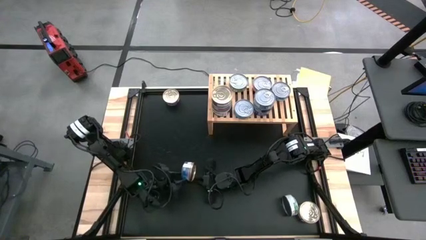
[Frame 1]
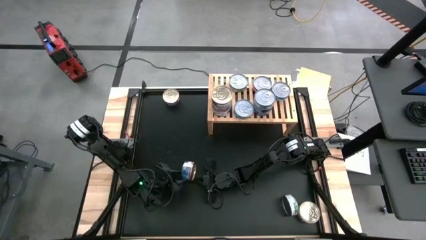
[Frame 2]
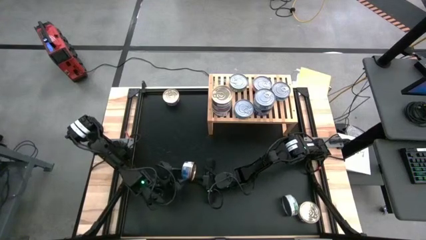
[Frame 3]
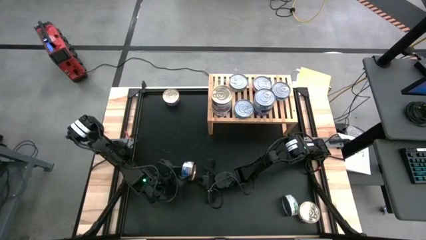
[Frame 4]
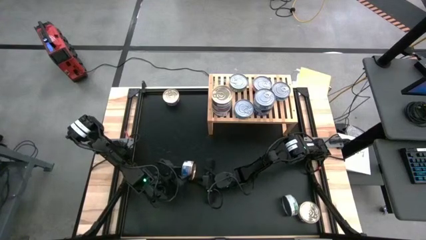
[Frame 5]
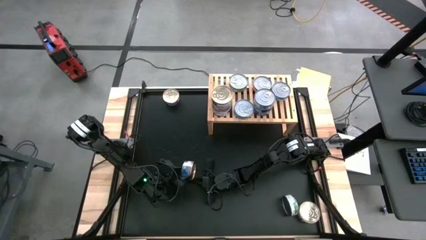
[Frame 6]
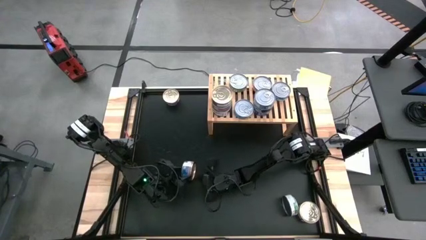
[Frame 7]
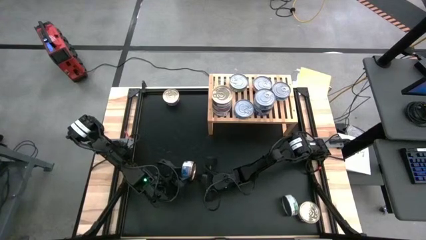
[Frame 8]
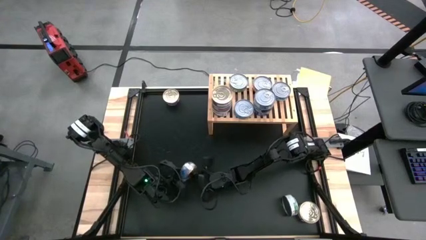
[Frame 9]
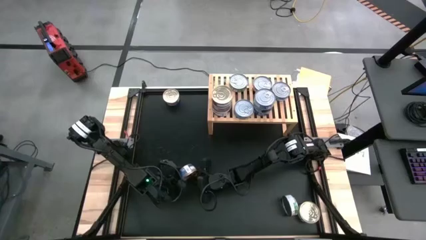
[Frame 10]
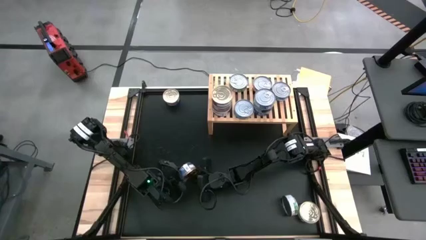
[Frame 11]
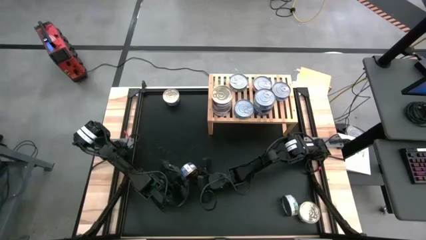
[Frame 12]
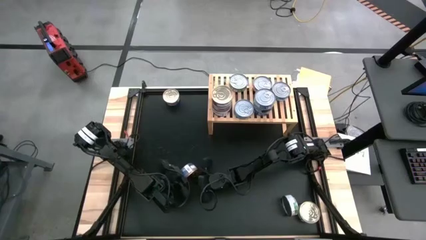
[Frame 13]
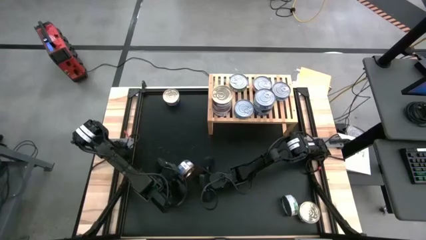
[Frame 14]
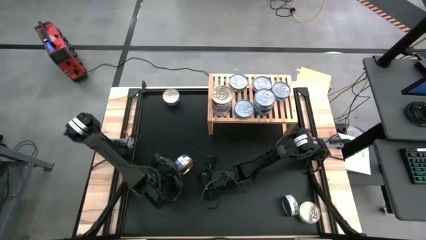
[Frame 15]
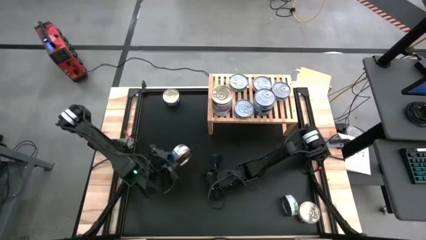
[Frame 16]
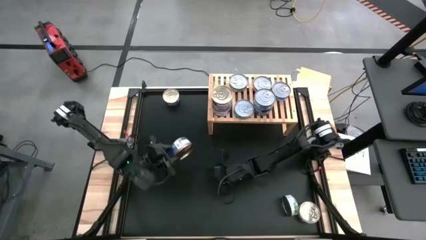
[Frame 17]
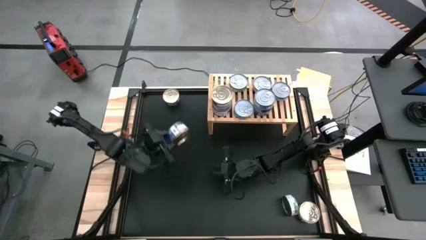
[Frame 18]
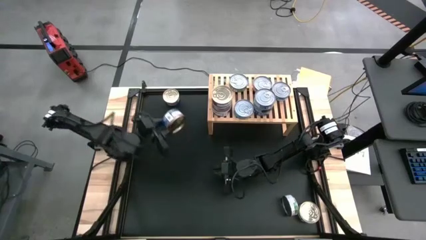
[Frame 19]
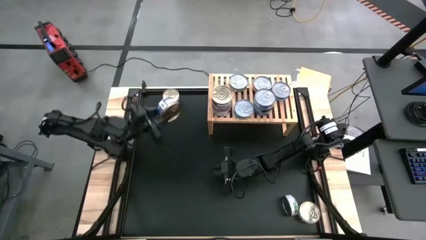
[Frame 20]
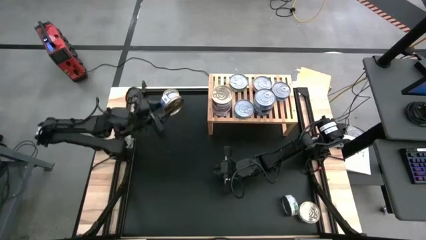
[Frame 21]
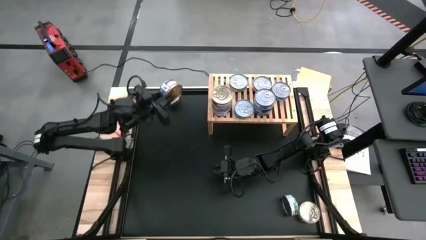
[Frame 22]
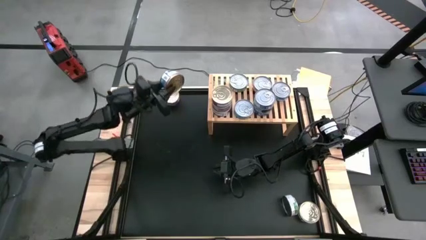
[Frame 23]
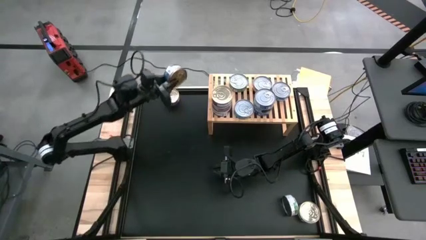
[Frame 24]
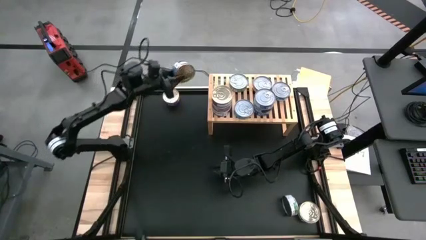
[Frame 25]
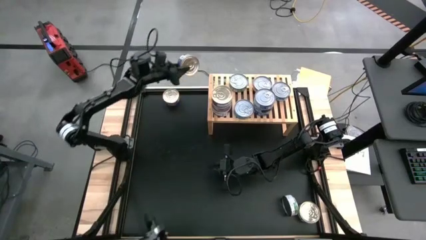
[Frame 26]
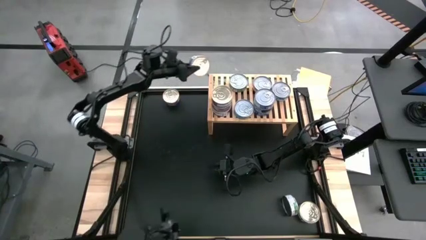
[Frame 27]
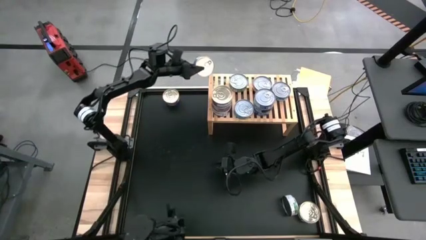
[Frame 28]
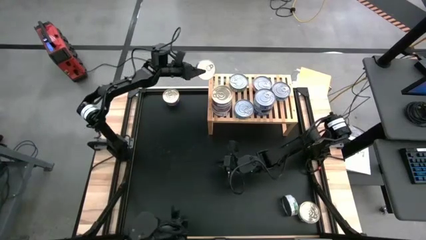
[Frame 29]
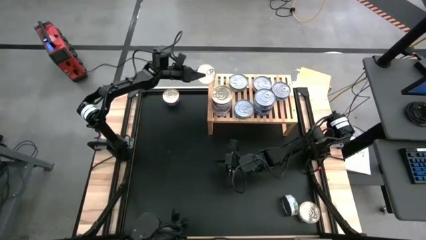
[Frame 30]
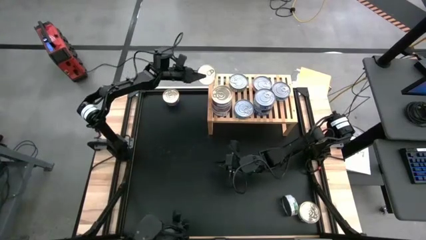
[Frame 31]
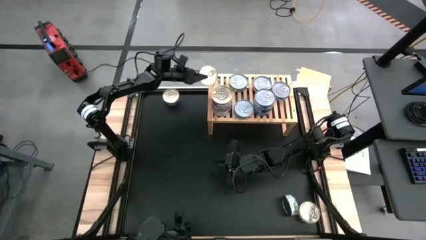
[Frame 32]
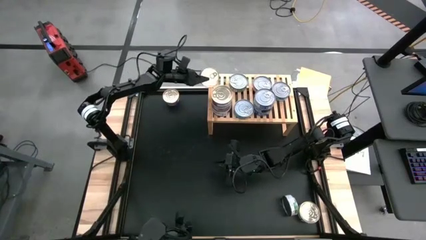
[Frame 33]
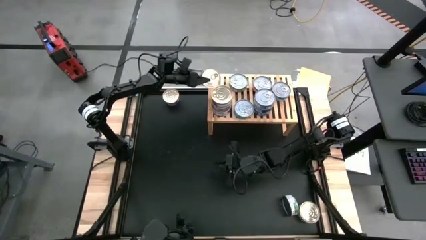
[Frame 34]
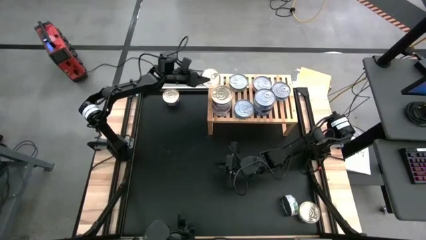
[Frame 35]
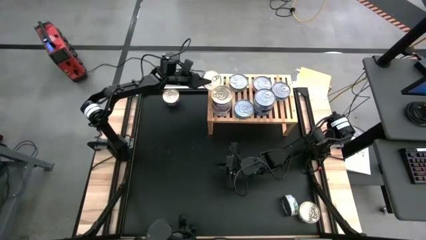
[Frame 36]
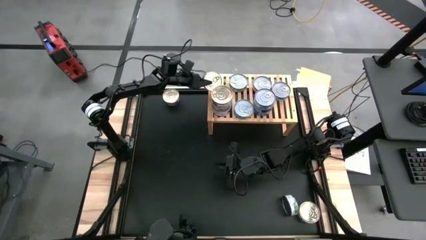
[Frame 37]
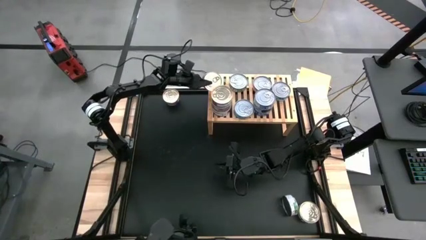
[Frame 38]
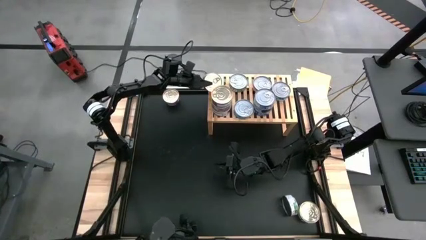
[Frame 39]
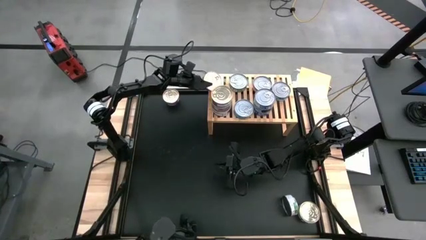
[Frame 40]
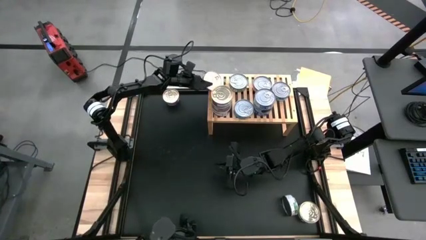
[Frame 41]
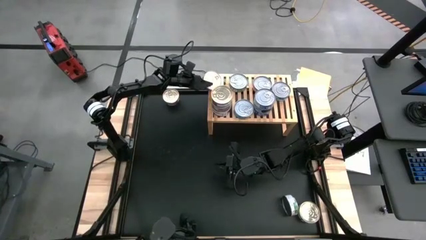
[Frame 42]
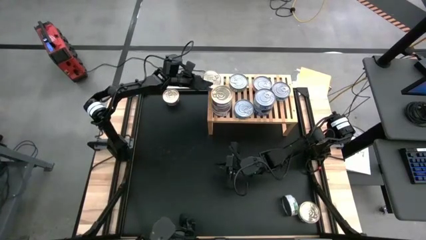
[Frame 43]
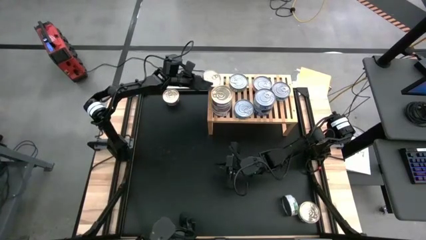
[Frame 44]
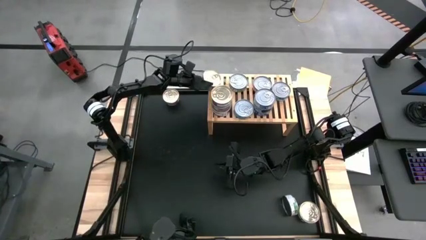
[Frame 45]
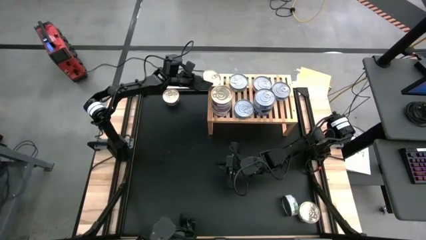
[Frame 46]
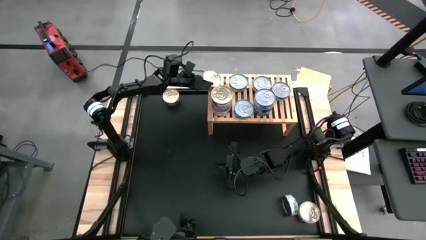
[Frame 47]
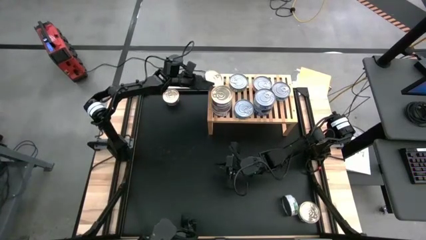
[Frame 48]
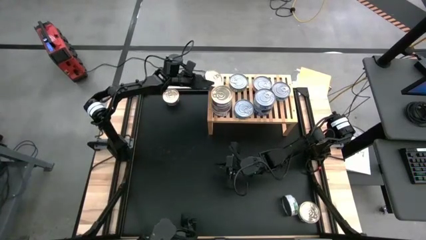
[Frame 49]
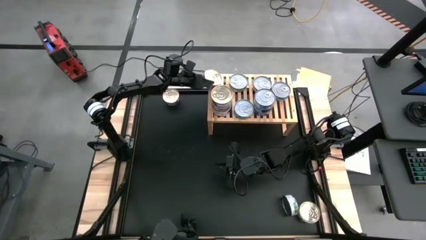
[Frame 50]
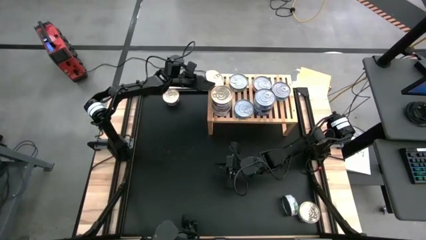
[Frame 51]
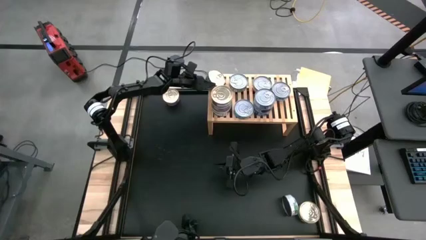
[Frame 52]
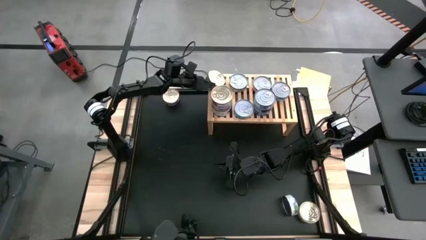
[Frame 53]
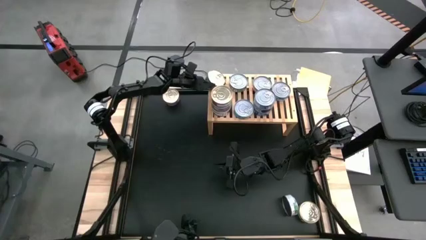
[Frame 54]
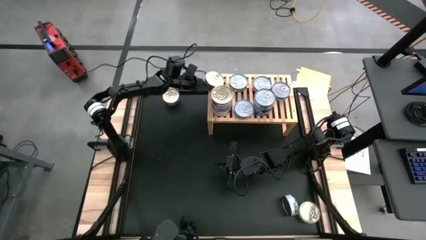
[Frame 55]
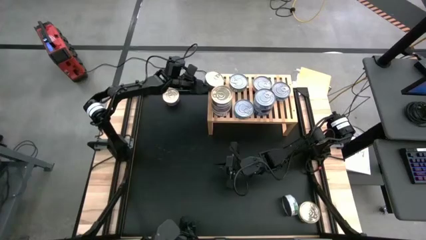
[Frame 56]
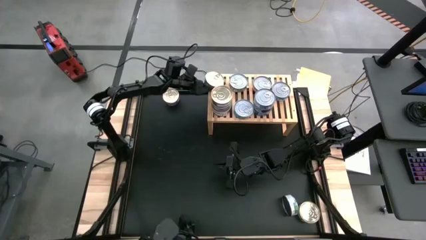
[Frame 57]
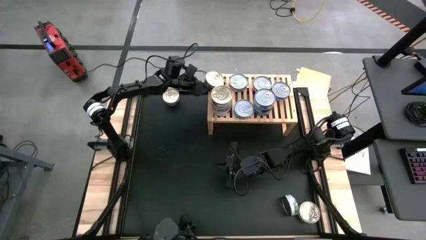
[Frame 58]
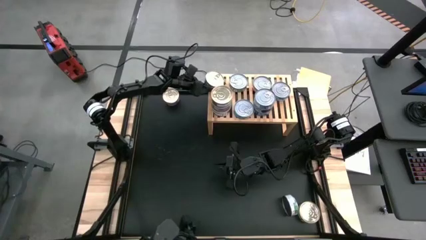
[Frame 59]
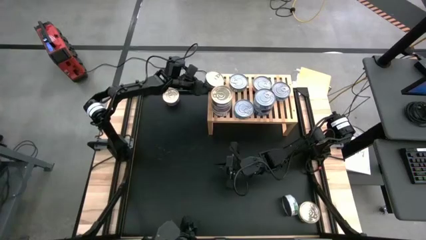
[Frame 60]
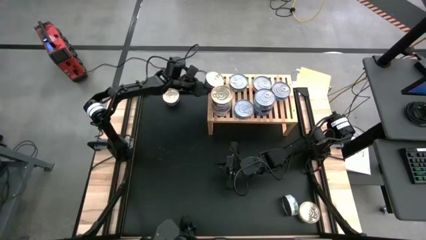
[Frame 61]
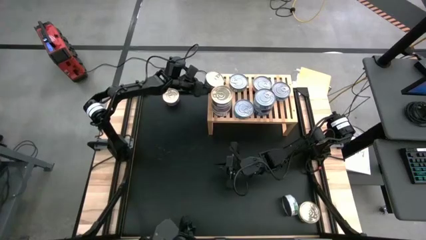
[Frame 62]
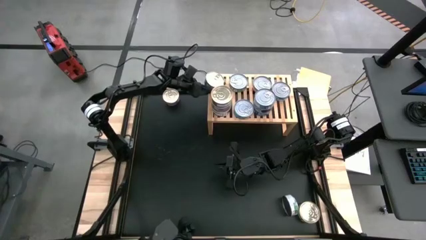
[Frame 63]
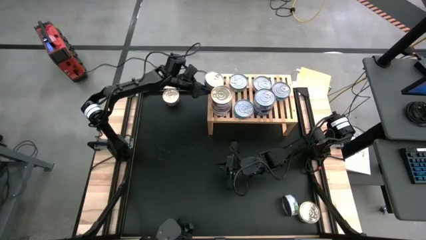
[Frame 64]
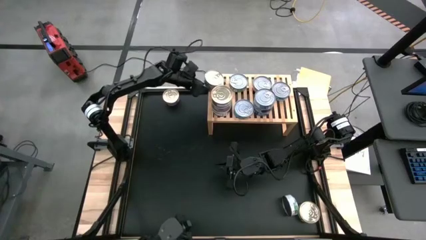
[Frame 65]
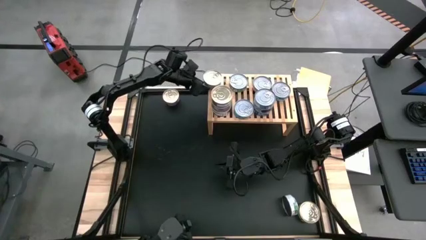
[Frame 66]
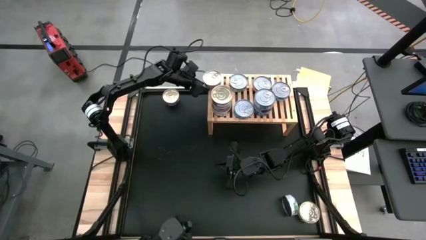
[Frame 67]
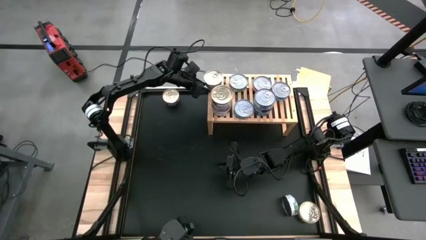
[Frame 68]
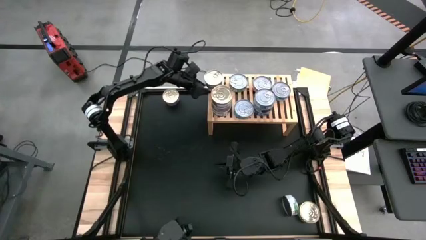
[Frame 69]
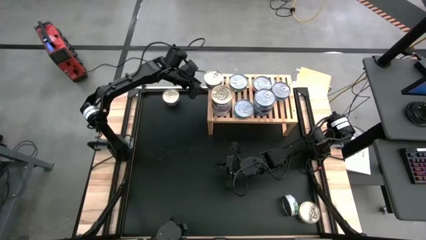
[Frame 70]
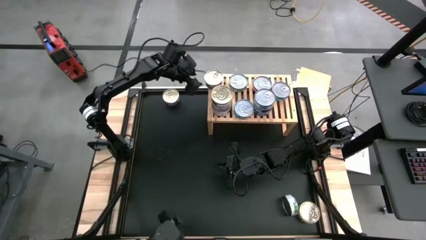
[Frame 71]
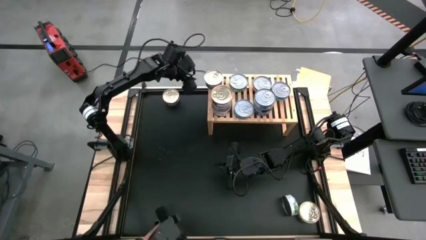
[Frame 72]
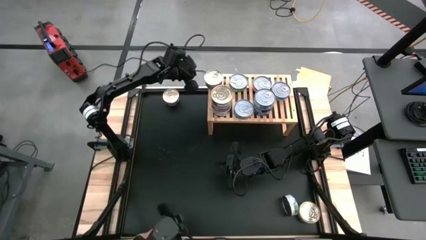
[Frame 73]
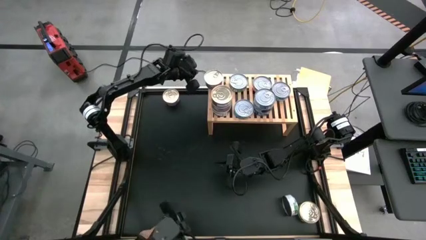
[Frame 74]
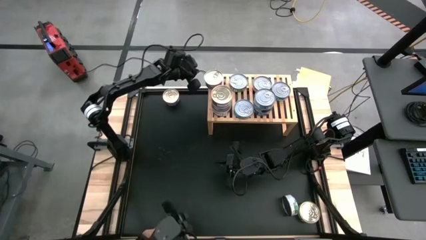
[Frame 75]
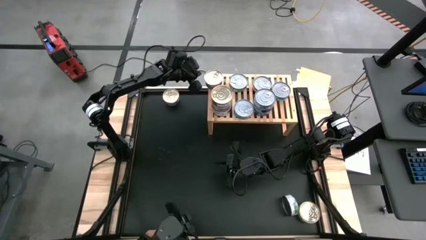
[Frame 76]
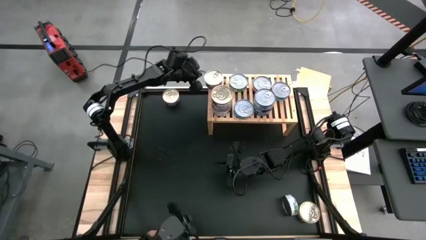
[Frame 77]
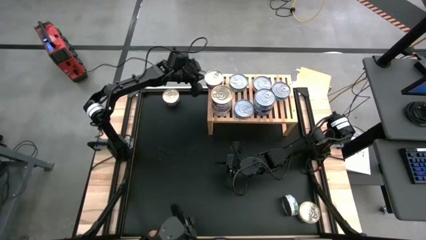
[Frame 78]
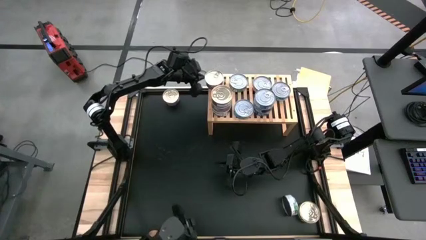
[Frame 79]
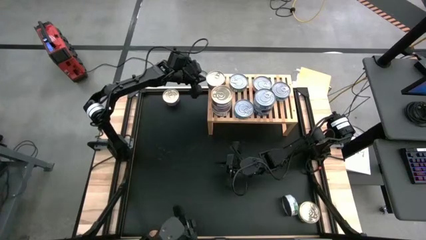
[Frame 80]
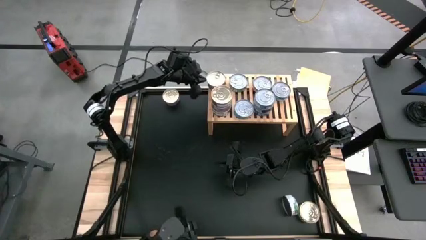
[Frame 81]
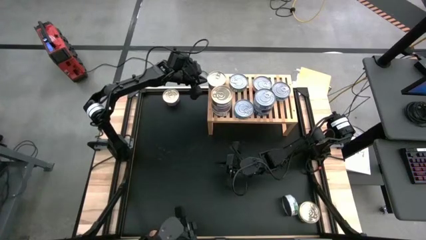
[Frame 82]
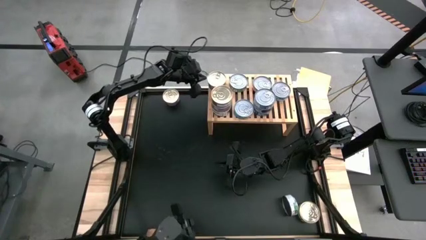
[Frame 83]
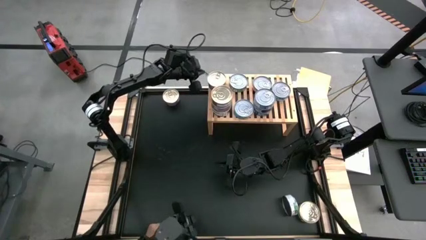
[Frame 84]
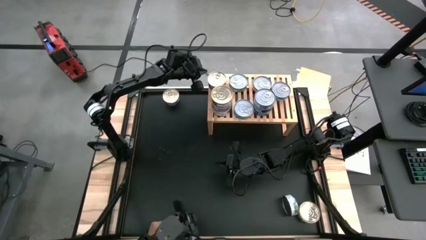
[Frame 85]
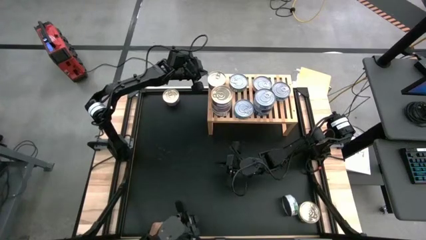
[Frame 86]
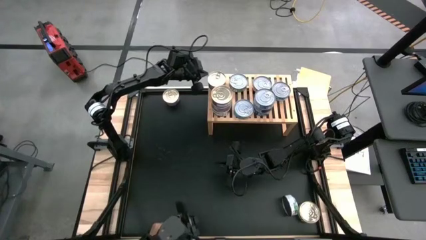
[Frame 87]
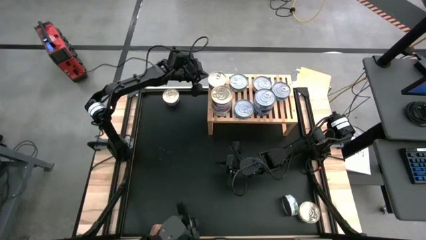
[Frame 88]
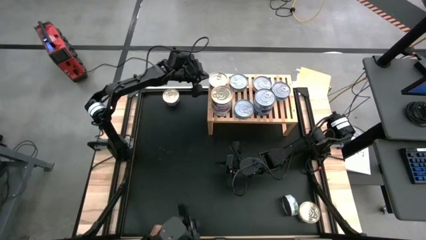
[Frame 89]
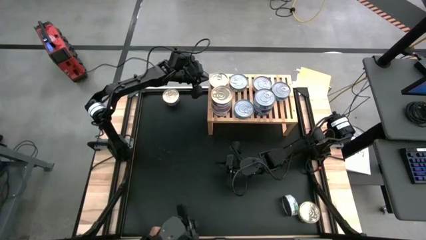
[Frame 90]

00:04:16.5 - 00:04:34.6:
Task: Stack canned seafood by type on shelf
Put the blue-pink tuna can on the shelf
